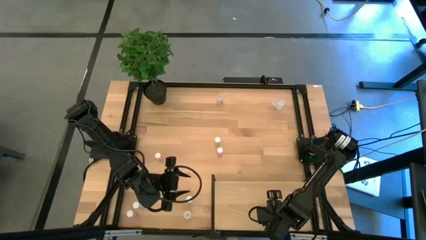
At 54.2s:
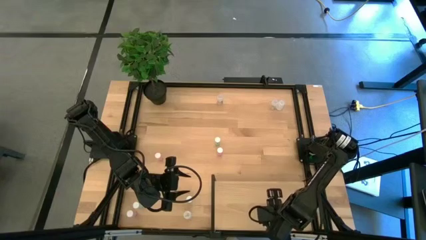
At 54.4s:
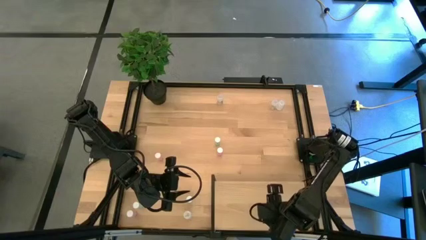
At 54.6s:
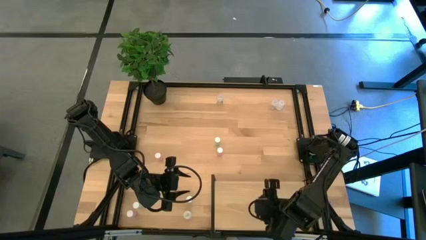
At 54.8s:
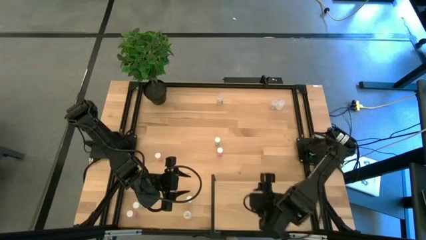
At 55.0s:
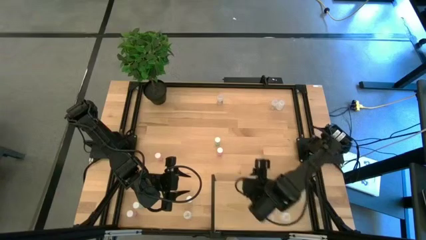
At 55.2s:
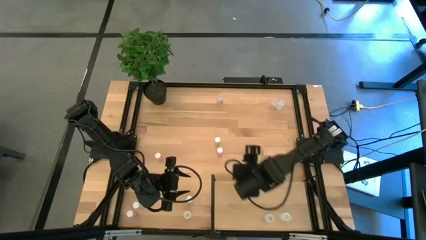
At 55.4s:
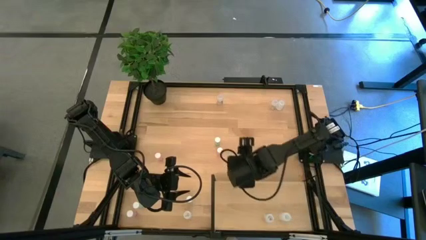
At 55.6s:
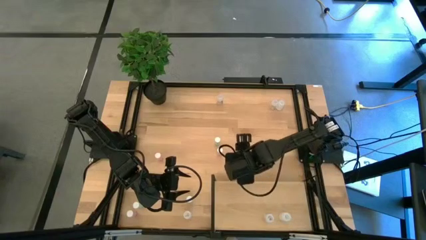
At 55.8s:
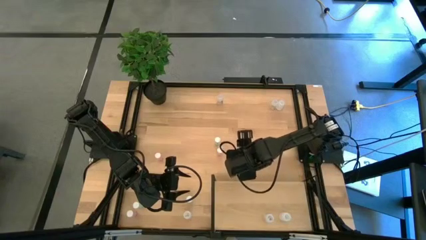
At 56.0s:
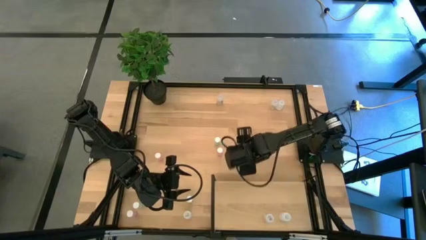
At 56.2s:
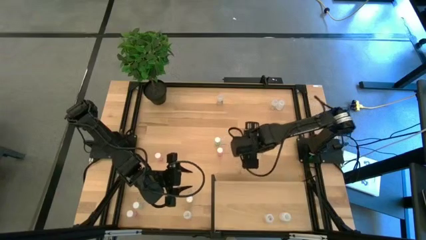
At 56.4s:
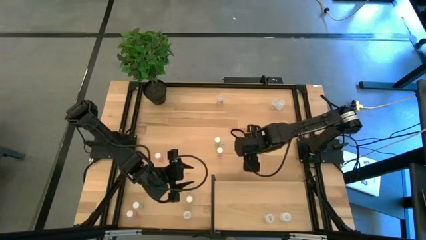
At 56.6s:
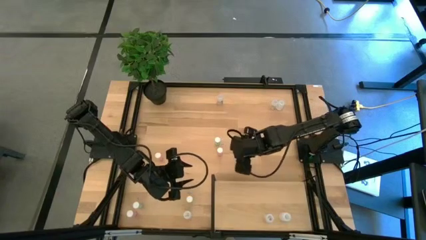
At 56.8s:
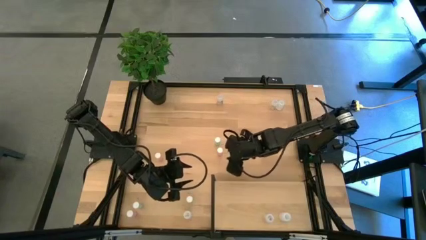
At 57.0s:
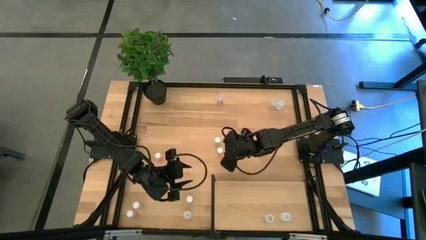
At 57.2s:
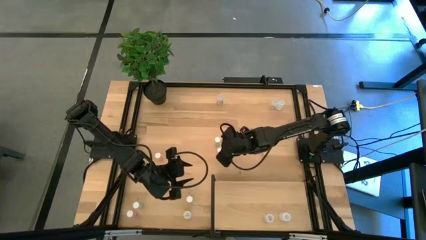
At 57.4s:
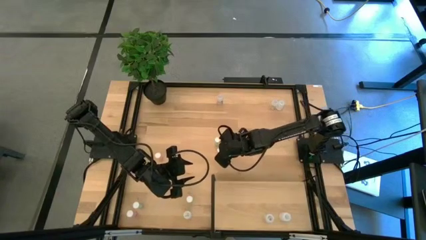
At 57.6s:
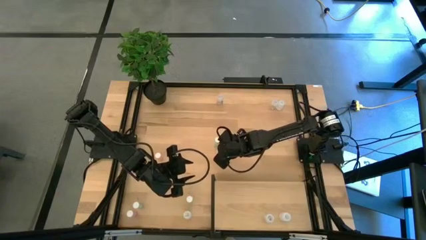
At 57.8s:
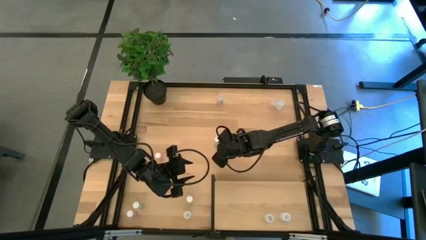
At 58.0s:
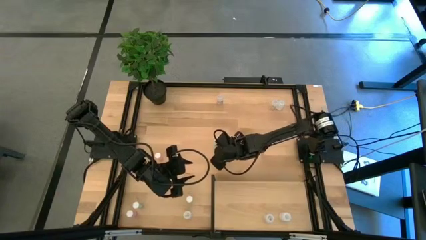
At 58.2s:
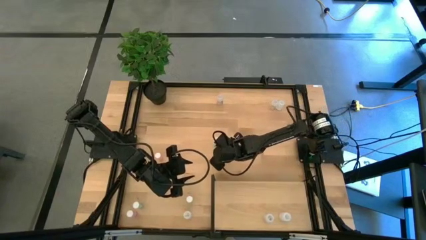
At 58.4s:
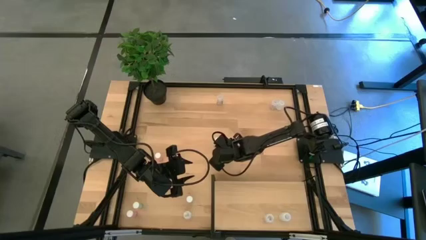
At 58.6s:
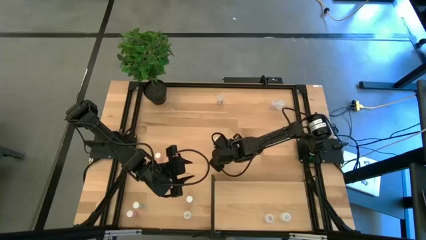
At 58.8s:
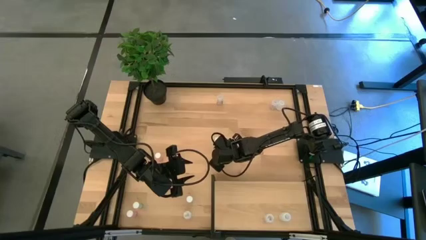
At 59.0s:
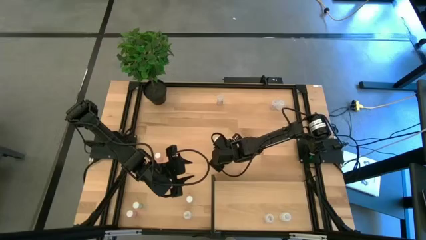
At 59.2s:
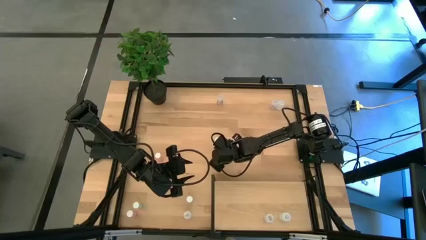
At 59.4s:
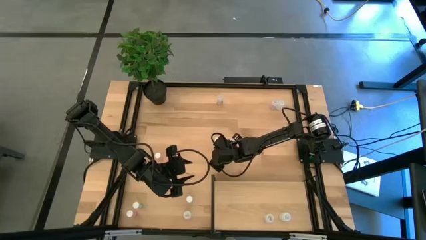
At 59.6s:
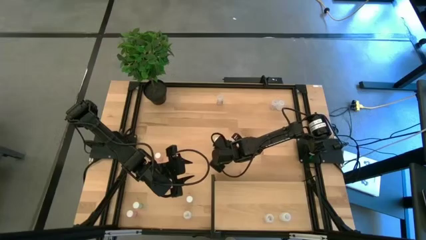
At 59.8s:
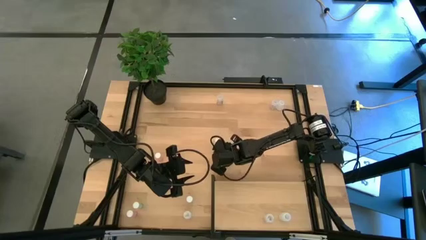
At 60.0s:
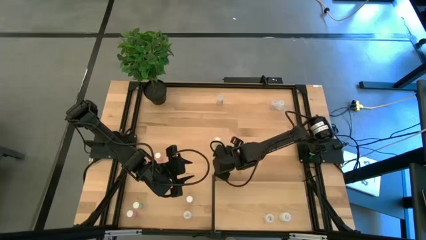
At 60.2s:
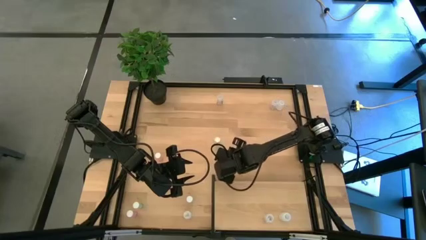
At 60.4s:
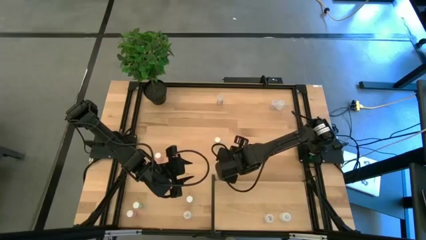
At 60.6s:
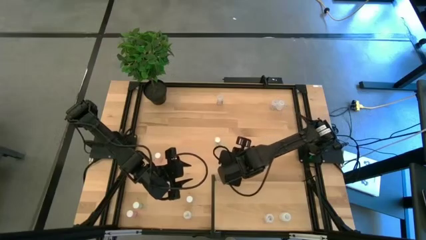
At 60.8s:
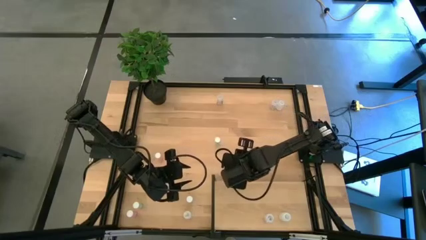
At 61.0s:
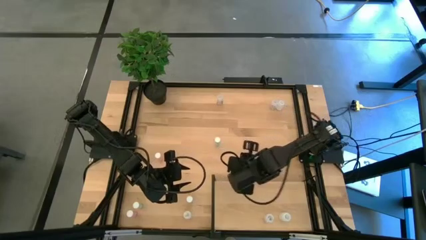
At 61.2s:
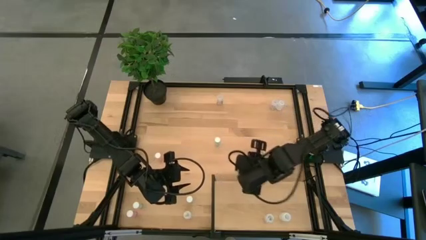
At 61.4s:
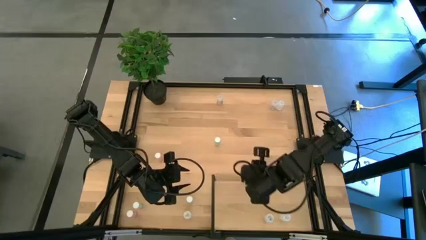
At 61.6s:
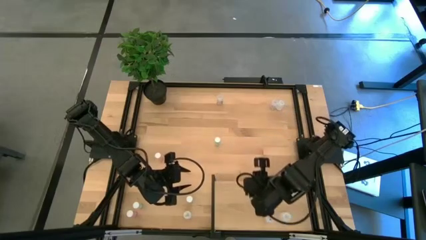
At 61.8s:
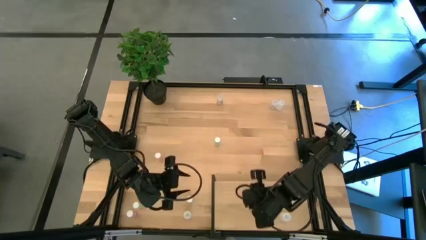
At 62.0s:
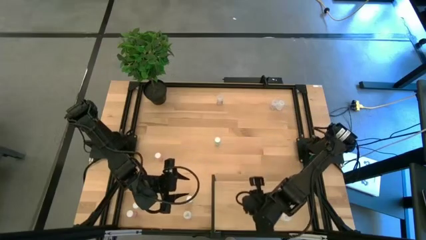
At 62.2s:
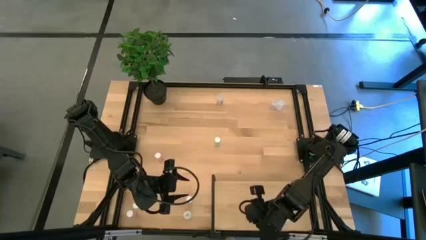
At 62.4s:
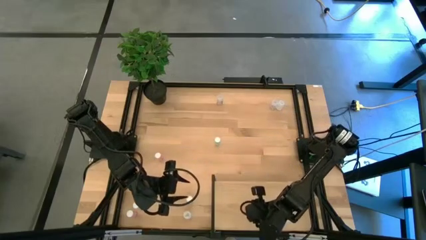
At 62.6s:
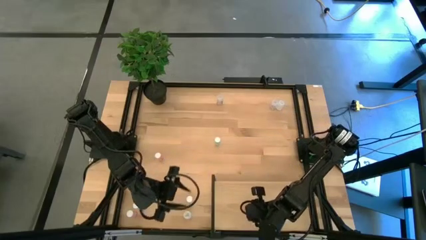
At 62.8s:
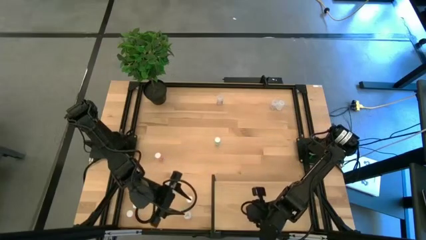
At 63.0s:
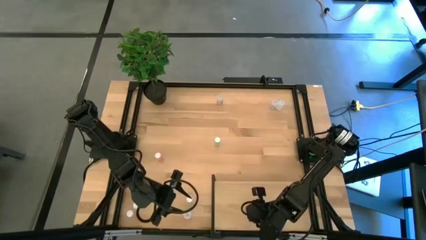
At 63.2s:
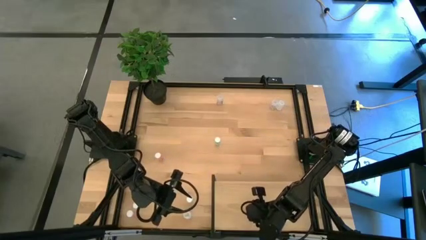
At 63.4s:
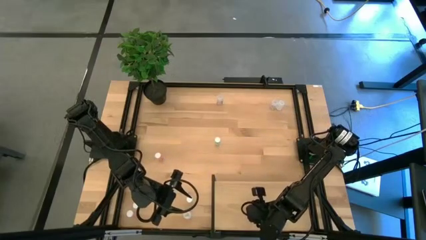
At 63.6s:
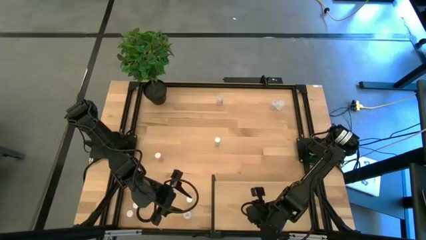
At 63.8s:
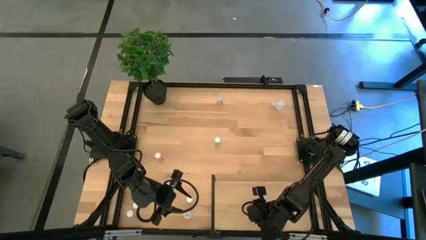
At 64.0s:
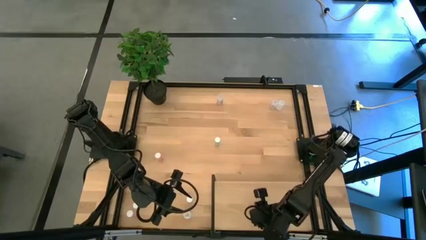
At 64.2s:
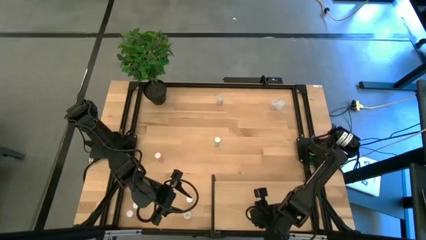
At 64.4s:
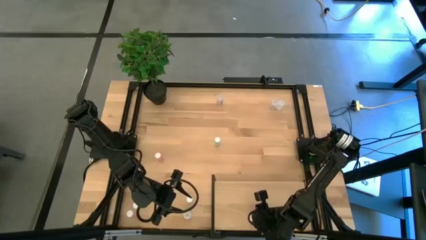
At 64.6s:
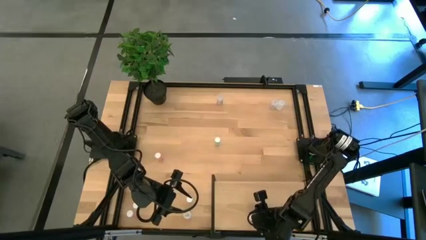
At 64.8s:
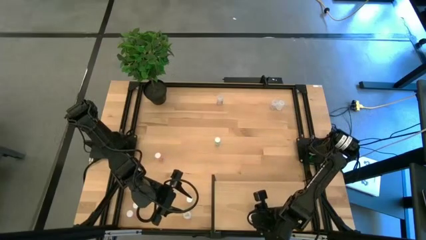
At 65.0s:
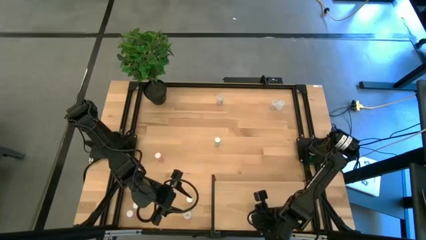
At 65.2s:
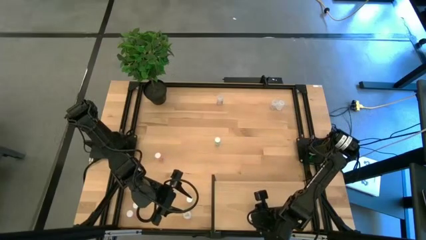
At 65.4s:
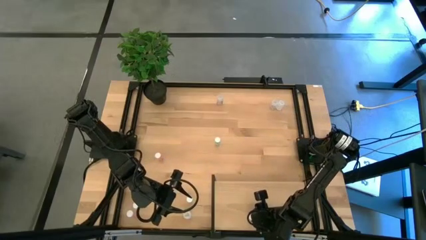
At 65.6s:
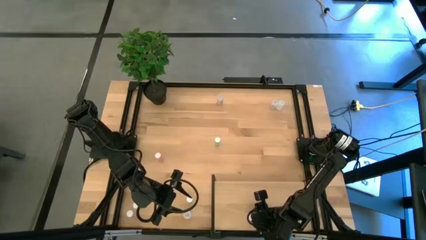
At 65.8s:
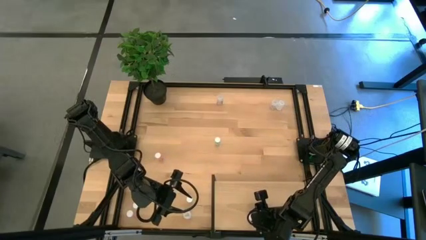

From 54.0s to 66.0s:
Task: Pick and place medicine bottles onto shelf by color
Put the right pink pill bottle on the shelf
